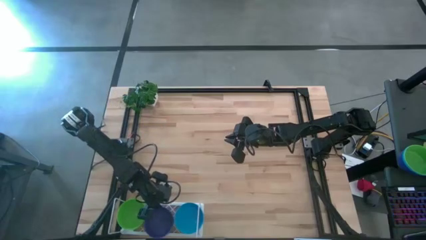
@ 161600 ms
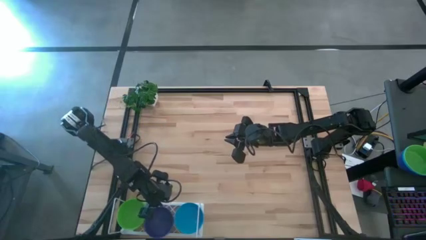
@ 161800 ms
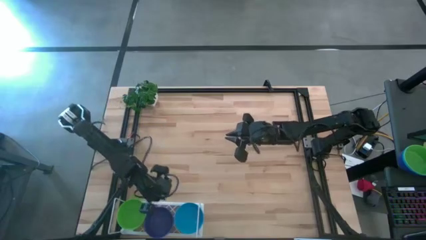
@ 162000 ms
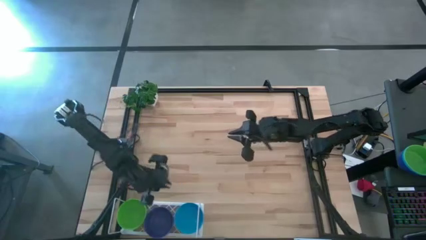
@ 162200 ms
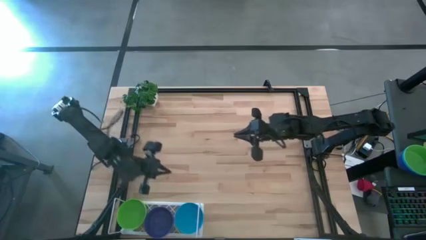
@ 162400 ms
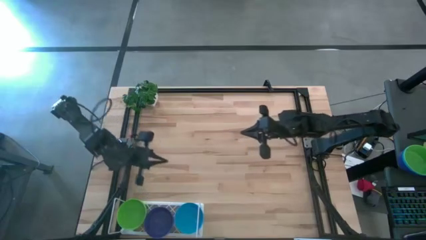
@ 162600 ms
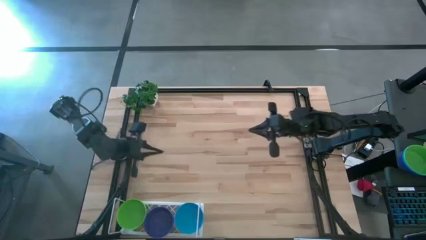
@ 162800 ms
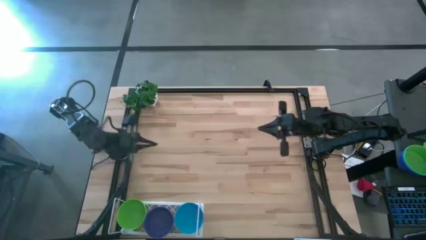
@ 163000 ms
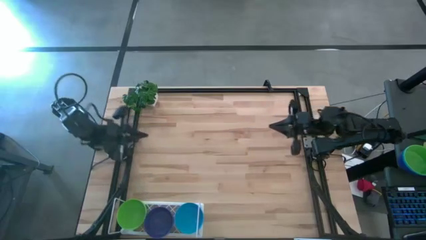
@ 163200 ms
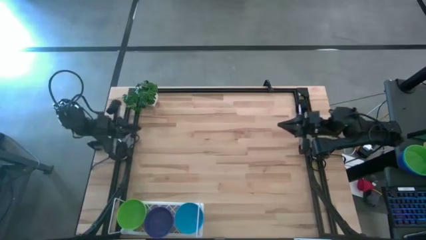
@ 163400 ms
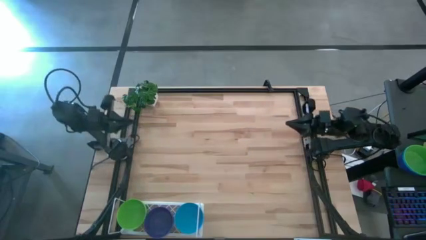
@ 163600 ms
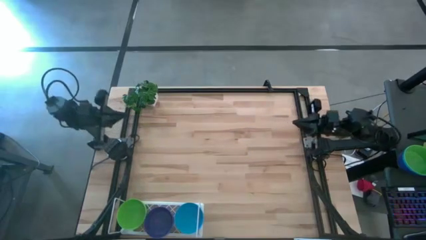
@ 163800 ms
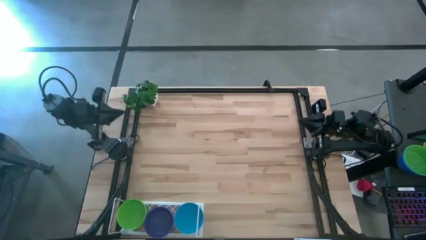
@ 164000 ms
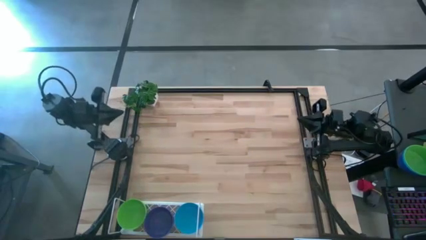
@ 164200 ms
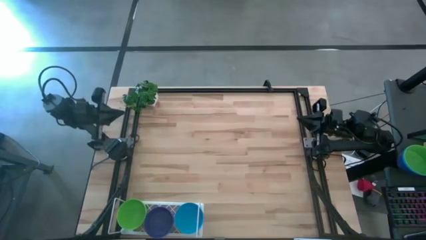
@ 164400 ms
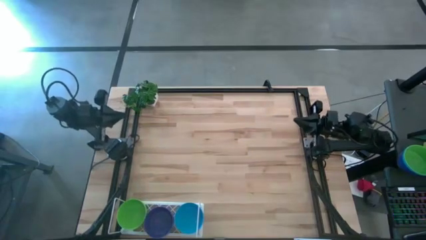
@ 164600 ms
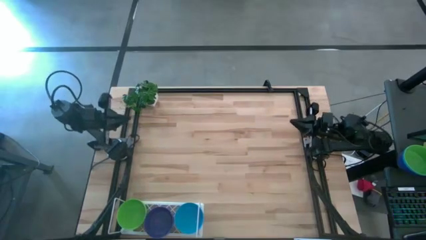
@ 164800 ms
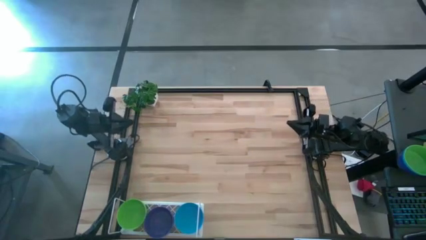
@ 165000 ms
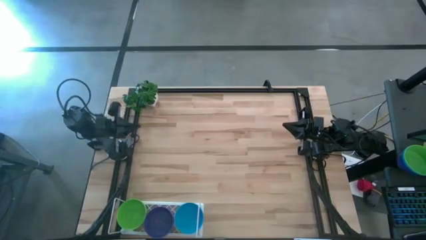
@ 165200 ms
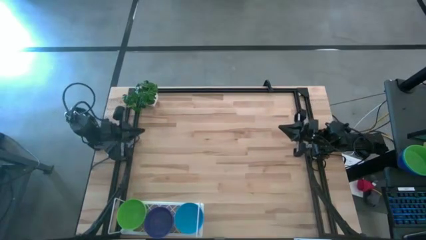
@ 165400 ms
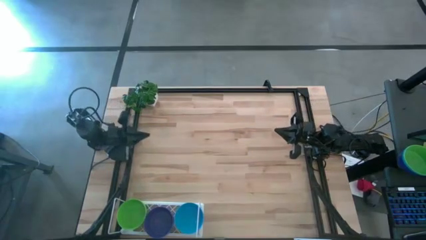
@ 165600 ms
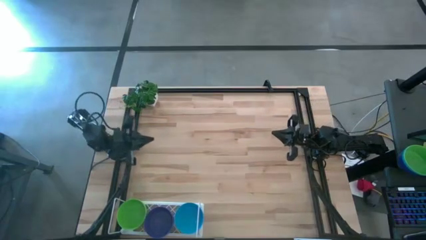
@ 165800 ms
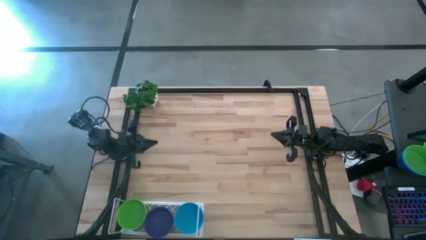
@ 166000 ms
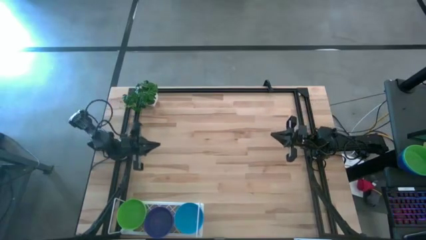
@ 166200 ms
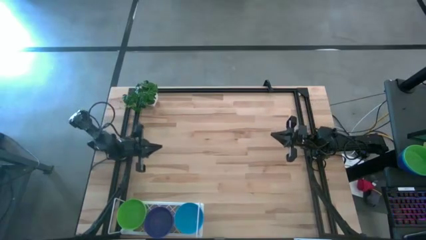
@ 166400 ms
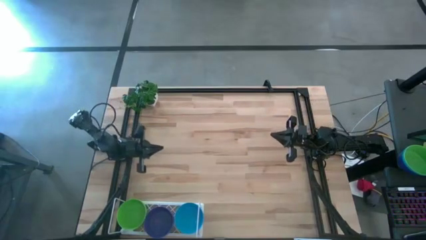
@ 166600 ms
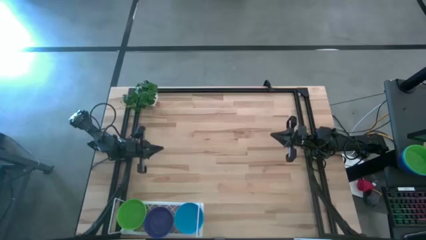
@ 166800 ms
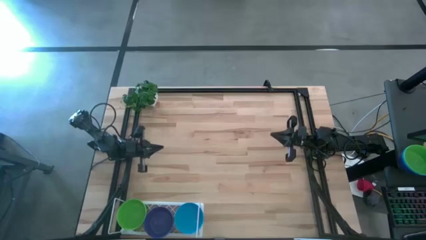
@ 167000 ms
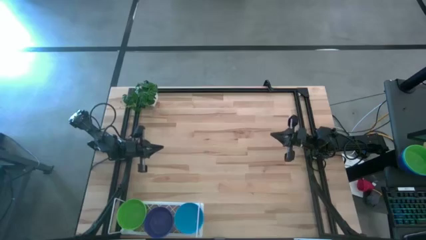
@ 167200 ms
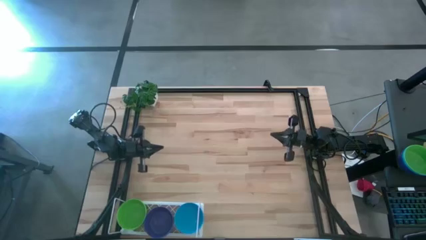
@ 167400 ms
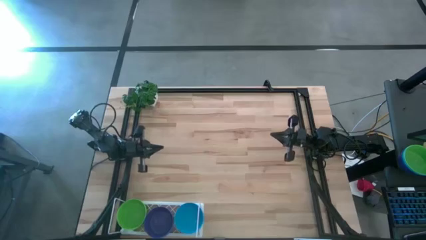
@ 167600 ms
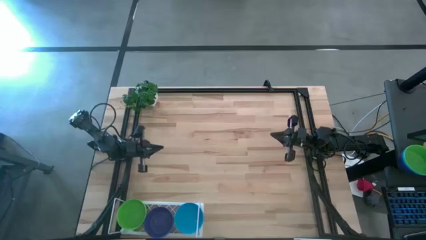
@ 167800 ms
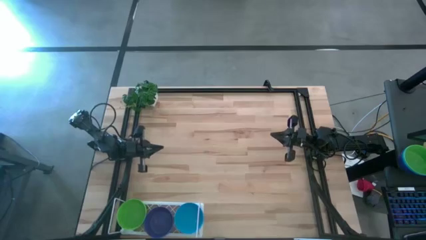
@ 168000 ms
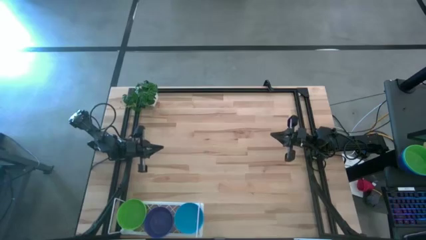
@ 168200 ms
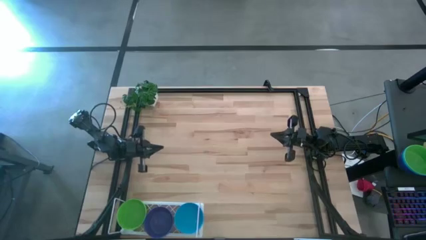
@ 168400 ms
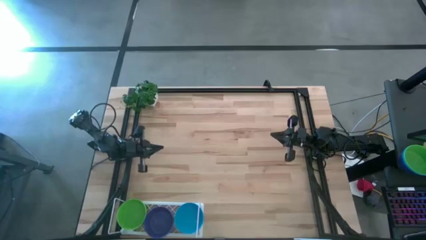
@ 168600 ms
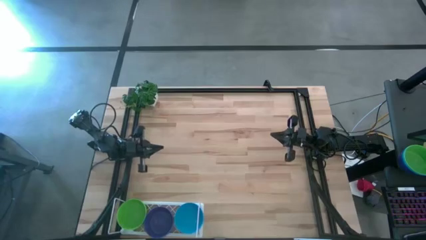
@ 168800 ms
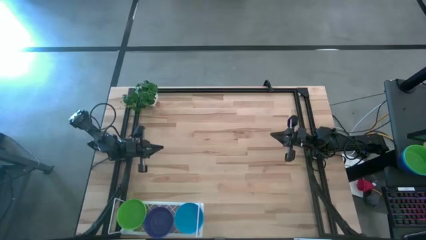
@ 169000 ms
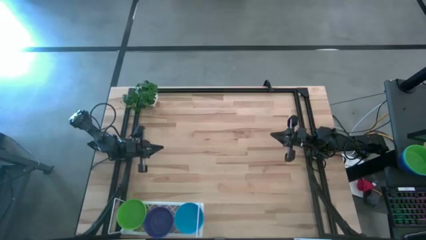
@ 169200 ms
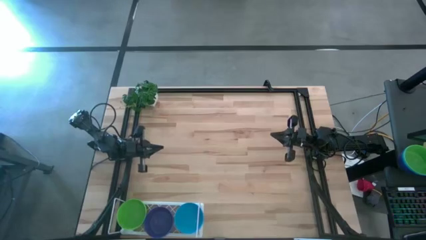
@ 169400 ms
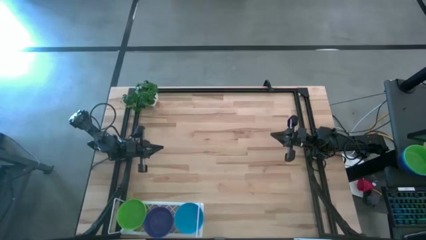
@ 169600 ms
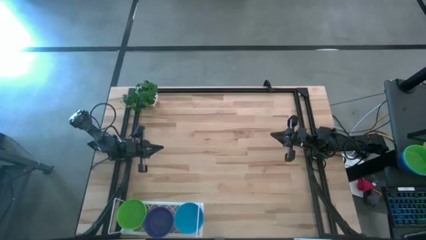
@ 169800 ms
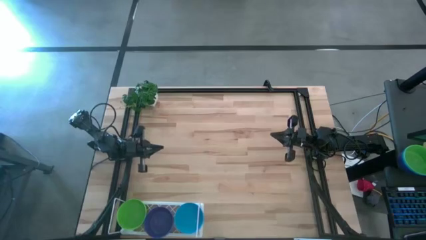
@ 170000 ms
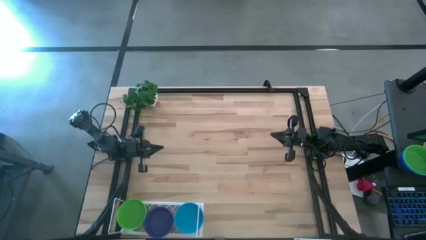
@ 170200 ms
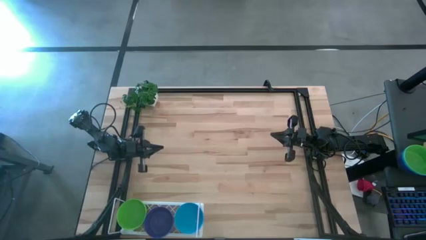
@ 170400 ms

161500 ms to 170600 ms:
Task: Pick & Place Mini bowls
Return to Home Position

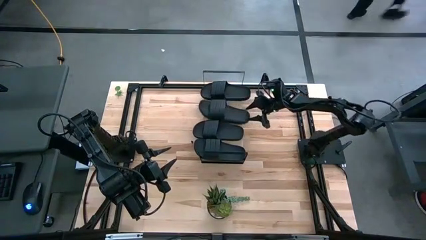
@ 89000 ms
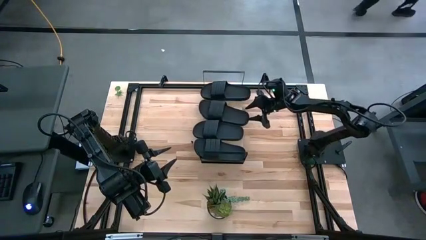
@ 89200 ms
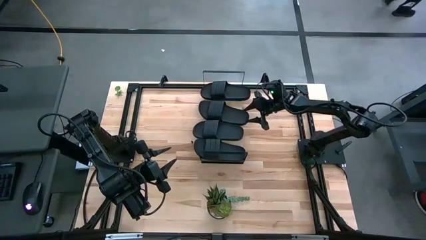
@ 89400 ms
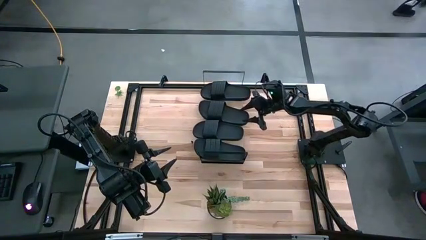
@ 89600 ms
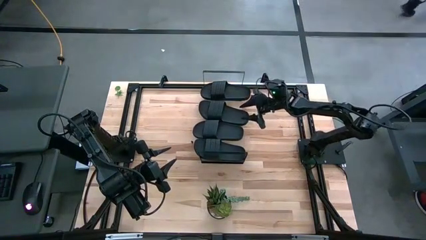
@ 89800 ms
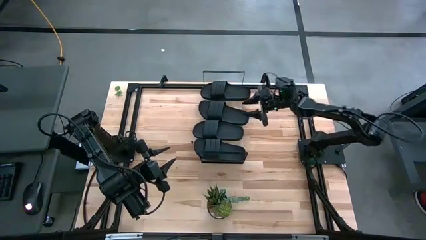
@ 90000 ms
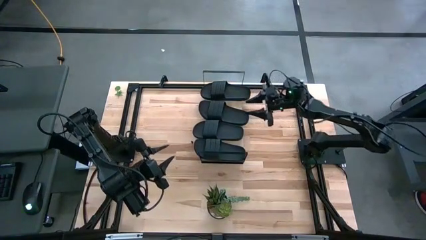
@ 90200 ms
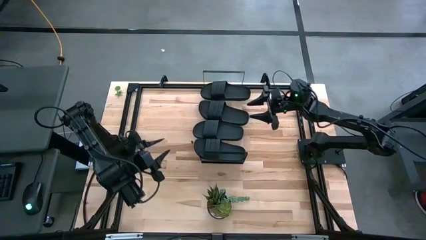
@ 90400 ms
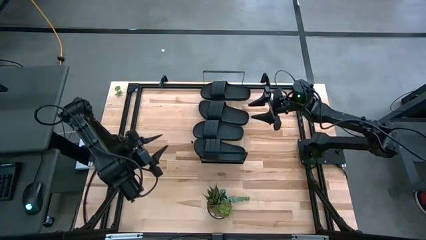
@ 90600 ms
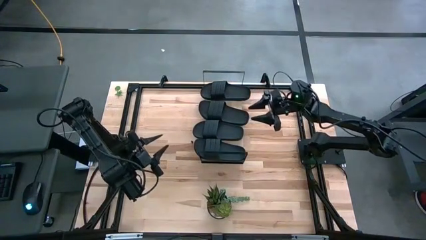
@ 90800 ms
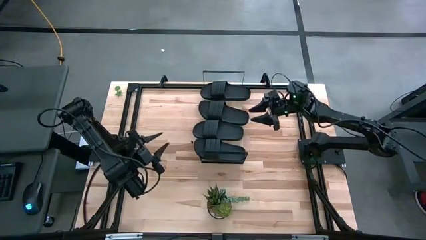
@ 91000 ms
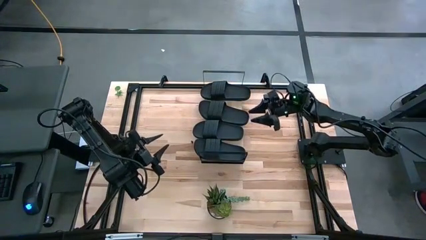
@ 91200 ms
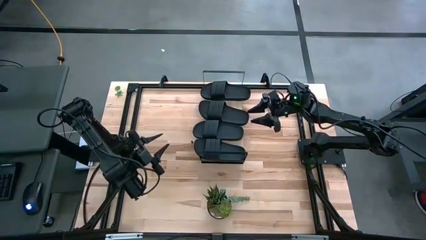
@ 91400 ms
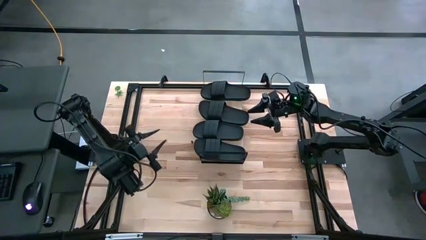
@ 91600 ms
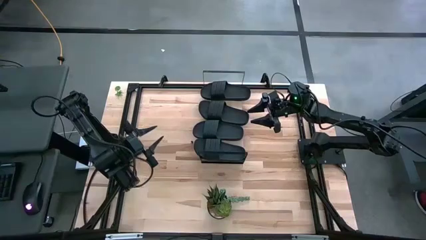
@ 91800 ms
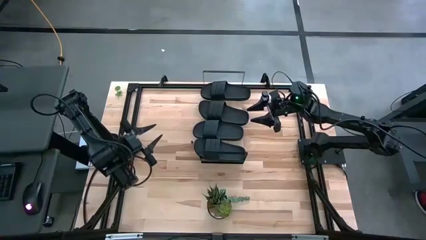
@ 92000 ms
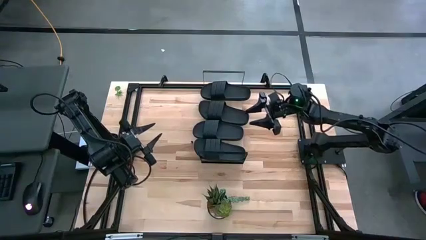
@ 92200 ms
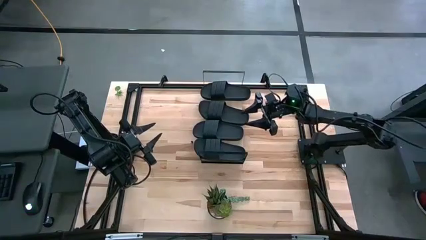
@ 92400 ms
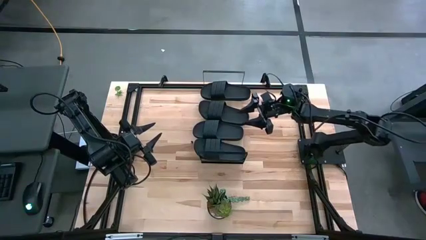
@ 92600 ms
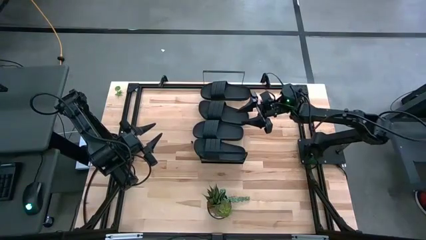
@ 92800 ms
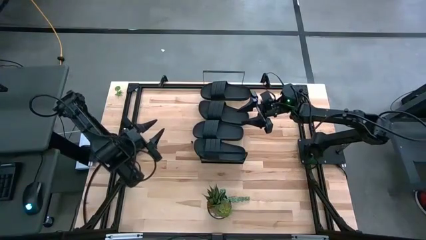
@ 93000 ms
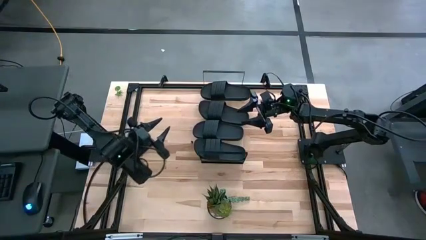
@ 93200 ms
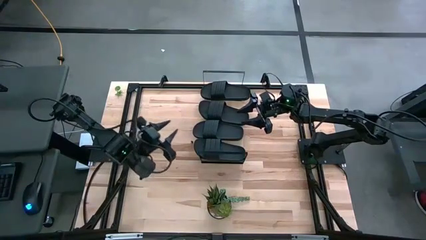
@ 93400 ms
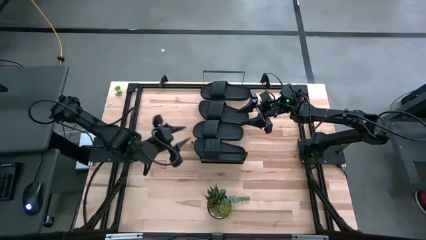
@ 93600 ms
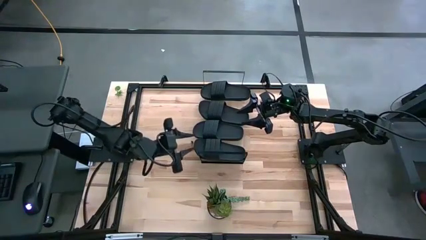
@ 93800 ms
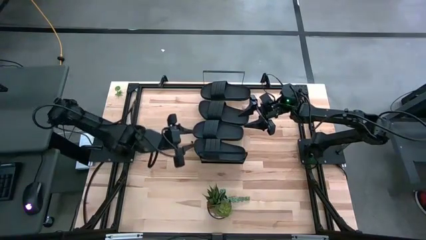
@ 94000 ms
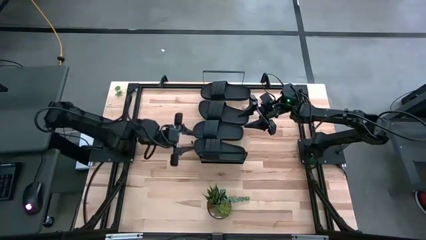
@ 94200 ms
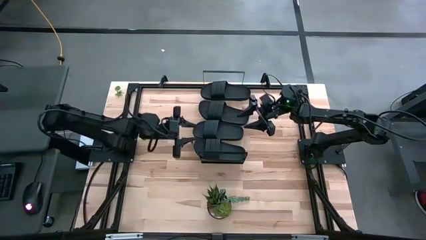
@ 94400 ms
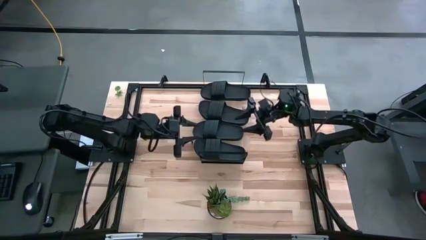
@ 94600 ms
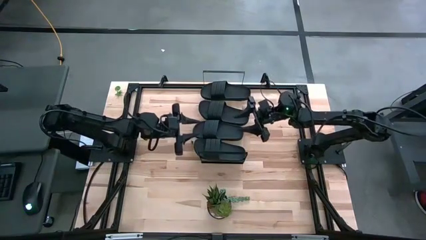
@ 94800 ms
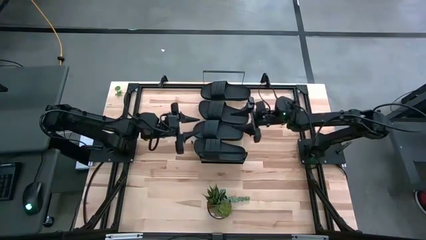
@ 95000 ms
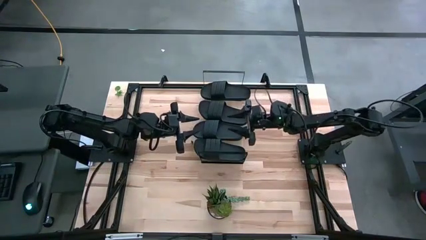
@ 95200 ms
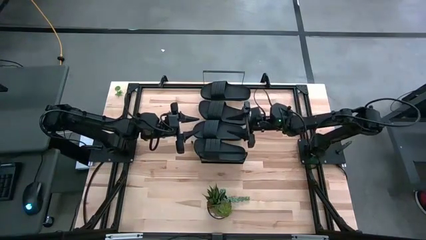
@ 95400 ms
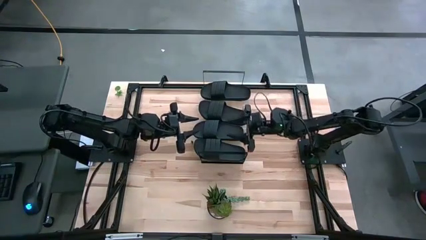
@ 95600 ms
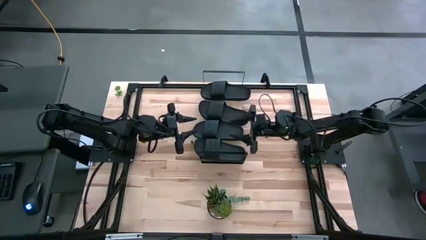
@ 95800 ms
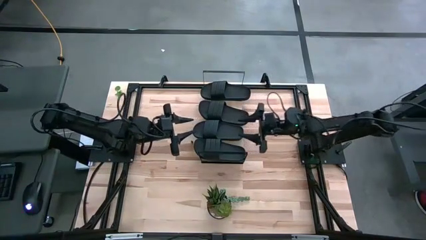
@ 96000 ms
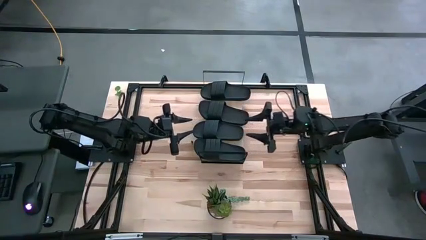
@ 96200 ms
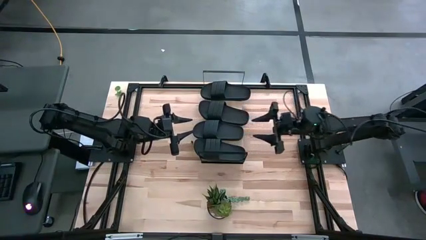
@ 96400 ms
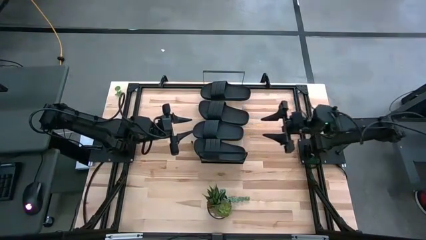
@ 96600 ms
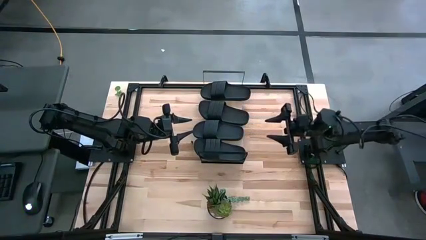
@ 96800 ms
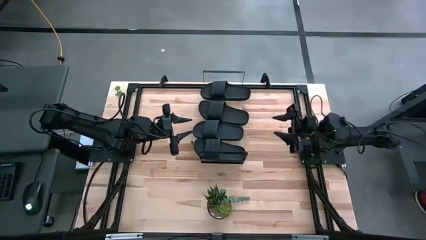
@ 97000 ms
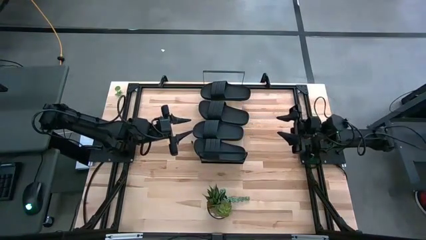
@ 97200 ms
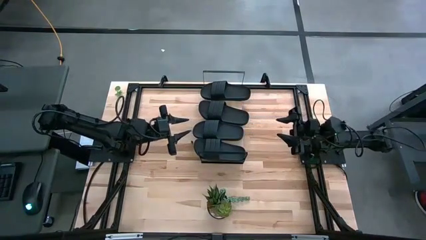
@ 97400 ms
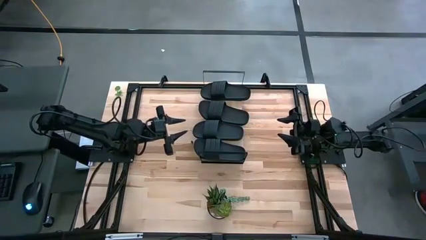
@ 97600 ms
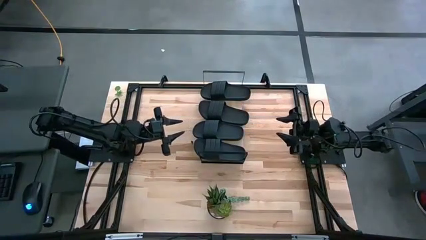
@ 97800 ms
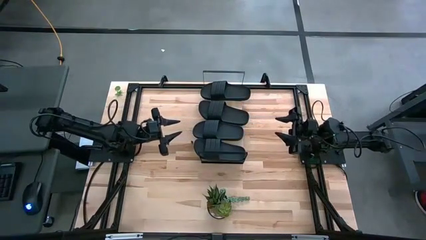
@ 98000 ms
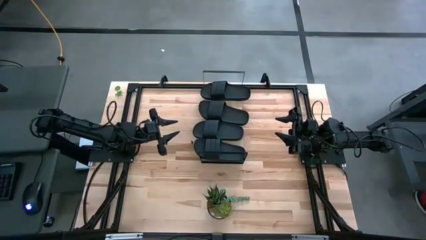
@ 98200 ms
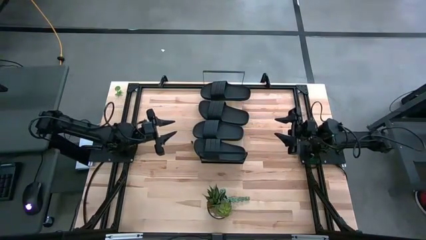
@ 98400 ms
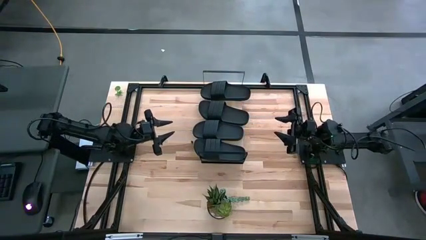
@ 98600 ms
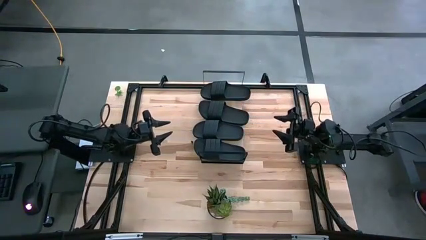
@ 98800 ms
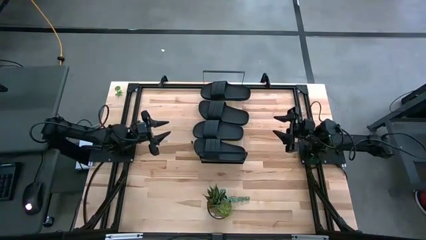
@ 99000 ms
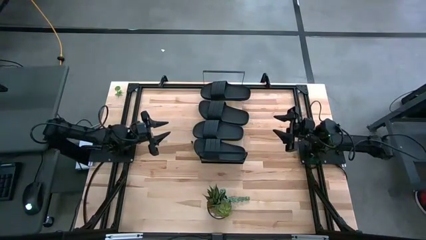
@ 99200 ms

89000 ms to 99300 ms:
Task: Pick and place slides into the shelf
Return to Home Position
